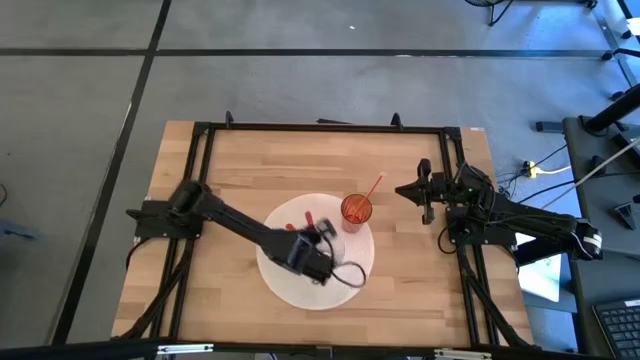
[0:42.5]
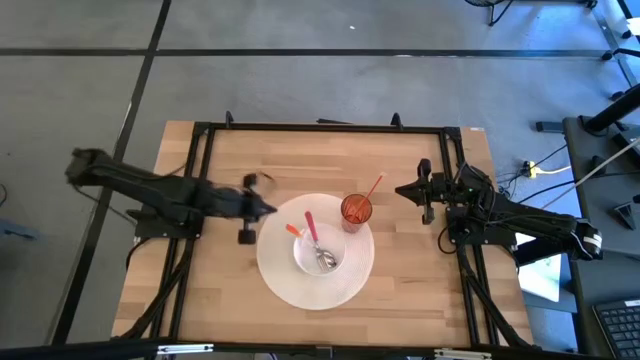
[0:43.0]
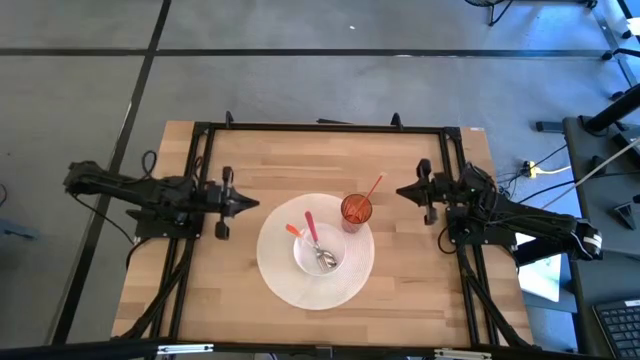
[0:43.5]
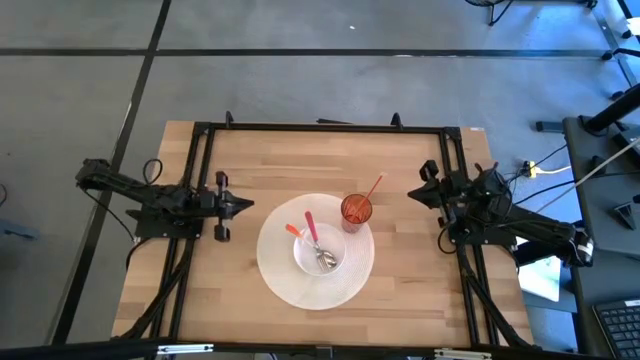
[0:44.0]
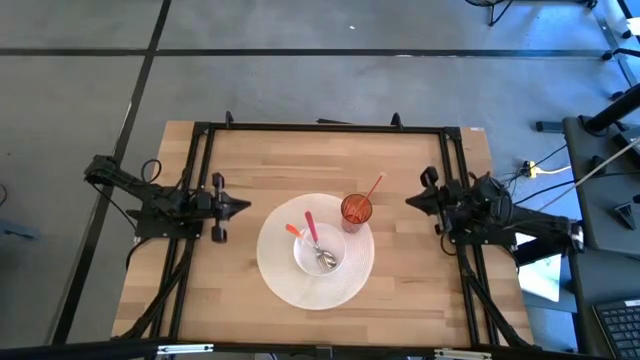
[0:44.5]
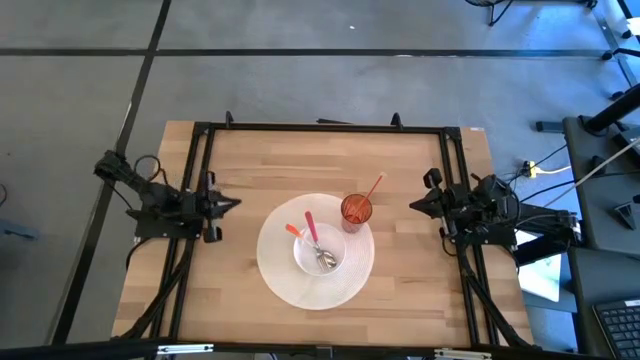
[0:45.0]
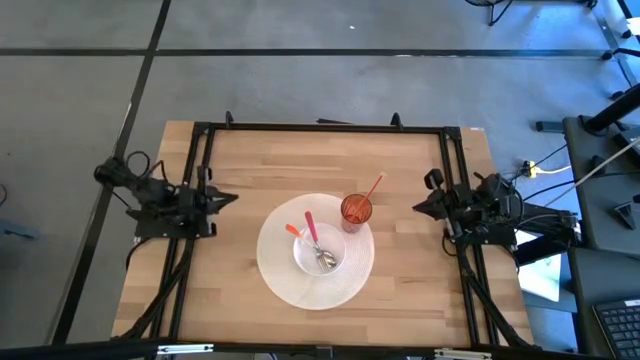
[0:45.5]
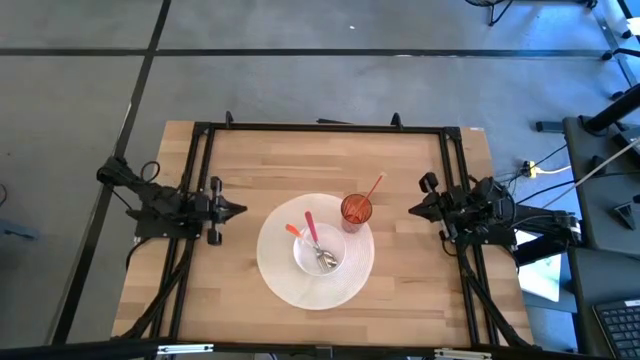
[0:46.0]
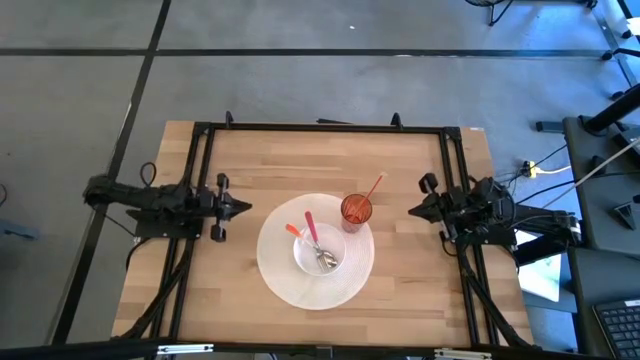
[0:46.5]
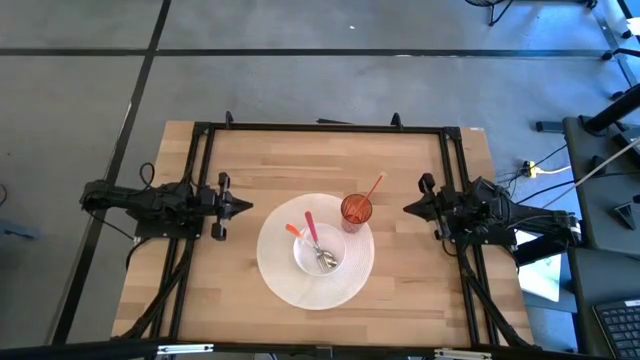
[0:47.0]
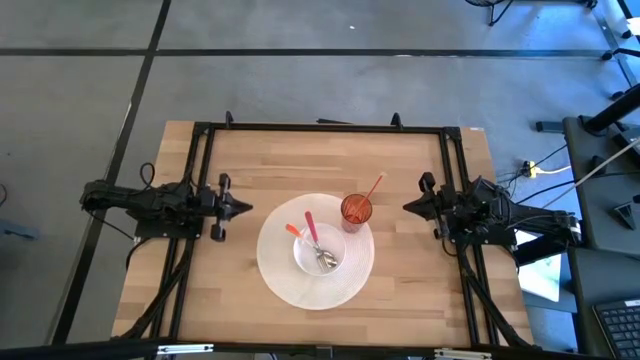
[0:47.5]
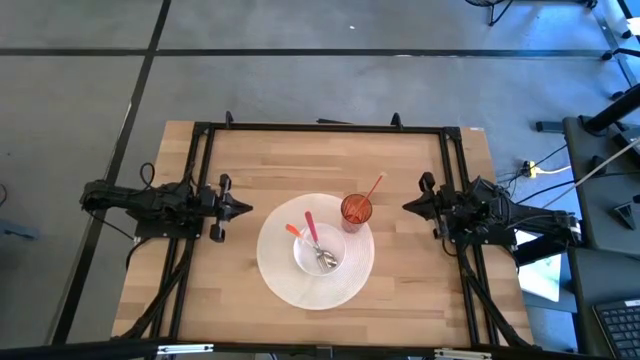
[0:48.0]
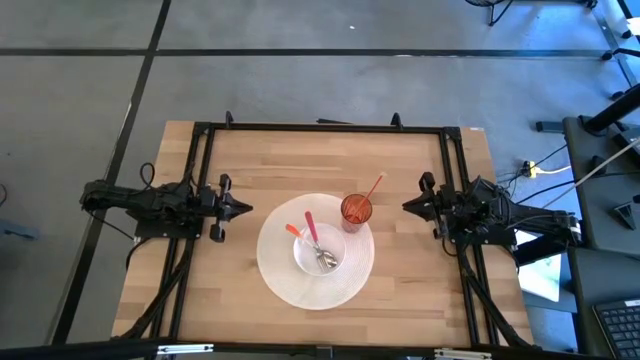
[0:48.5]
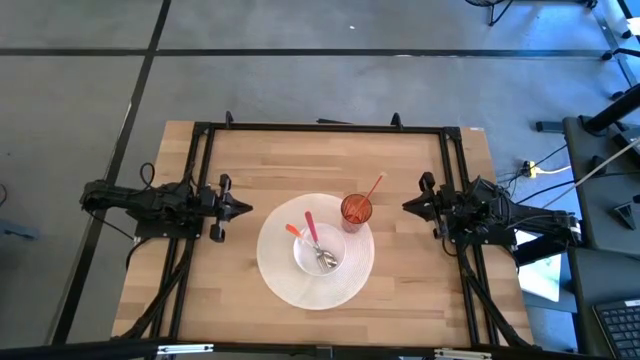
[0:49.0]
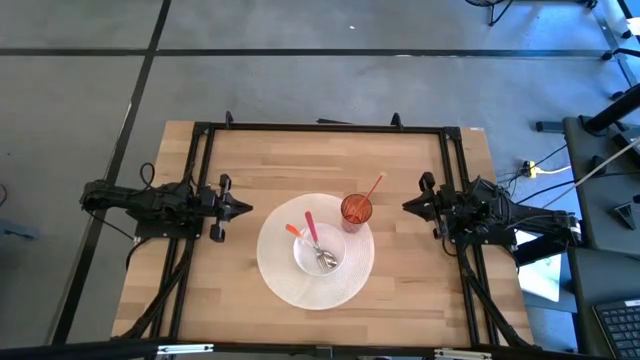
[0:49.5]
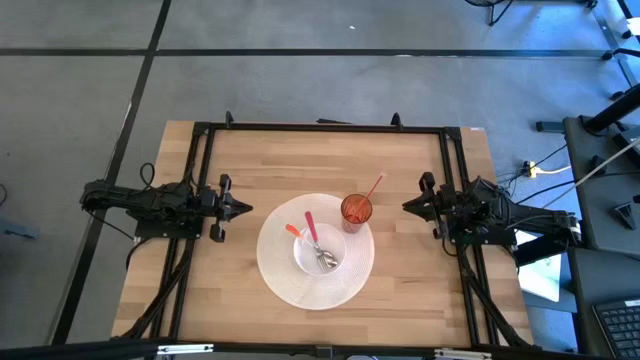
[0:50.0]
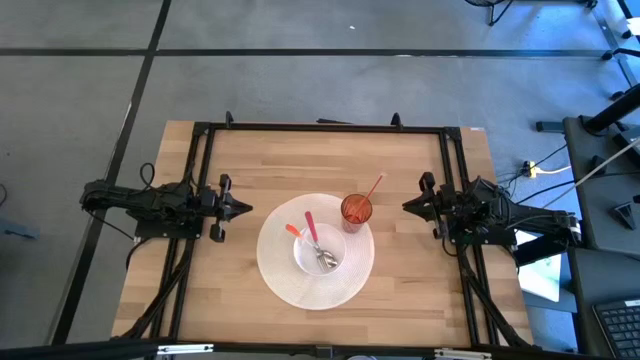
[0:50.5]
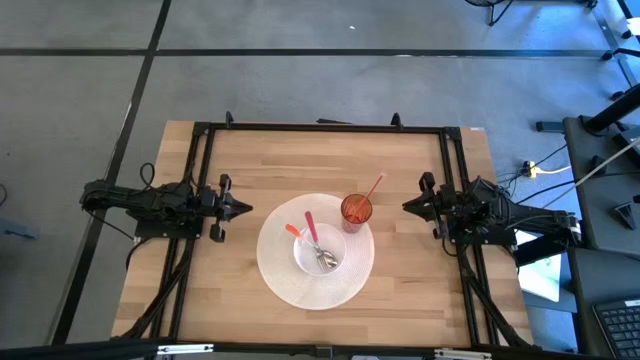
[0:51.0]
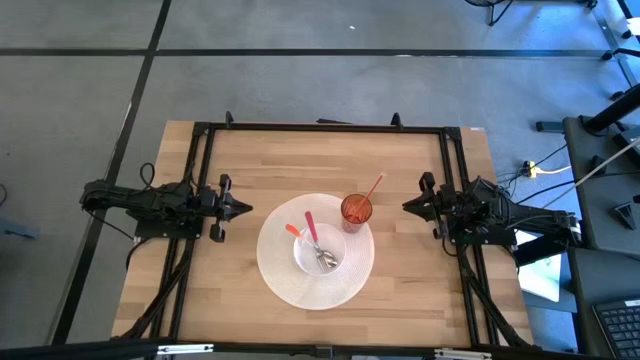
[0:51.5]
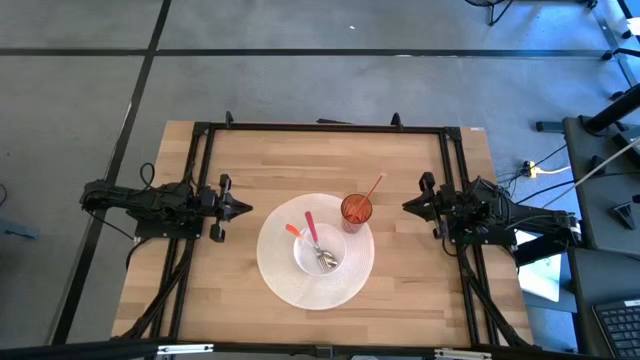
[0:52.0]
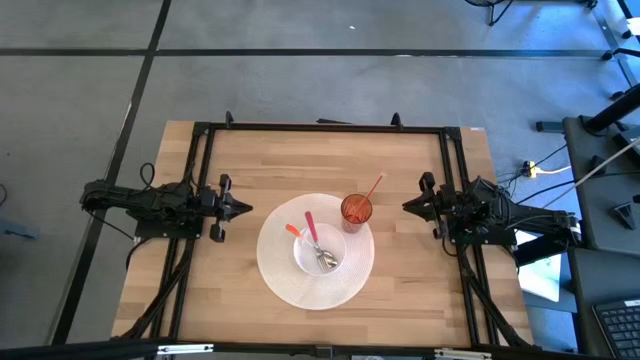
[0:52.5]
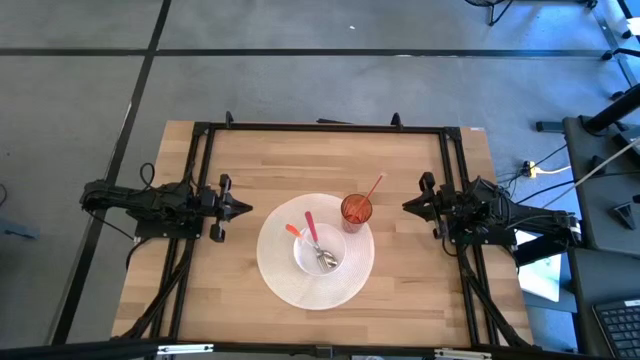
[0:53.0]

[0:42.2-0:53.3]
Task: Pick & Place Utensil
Return to Home Position

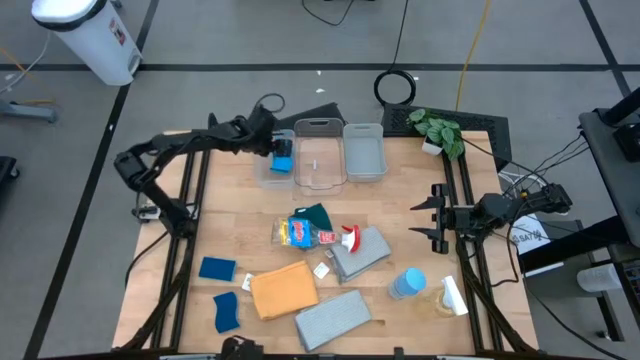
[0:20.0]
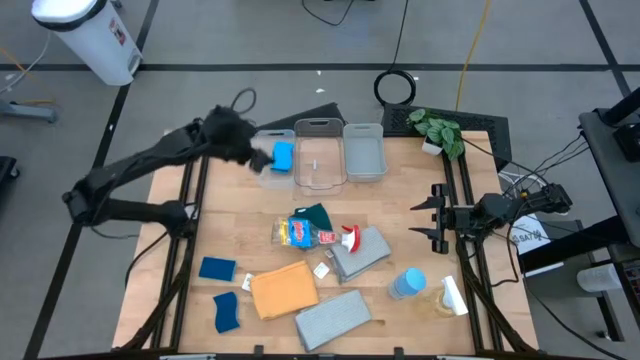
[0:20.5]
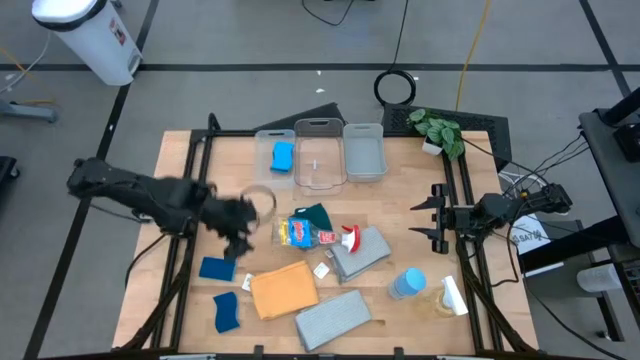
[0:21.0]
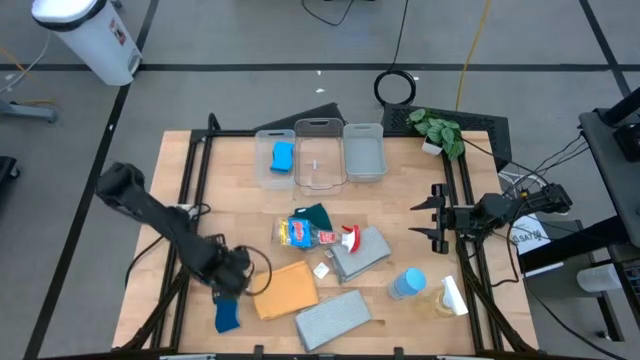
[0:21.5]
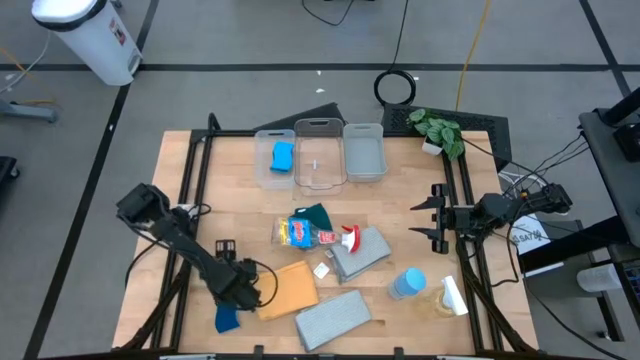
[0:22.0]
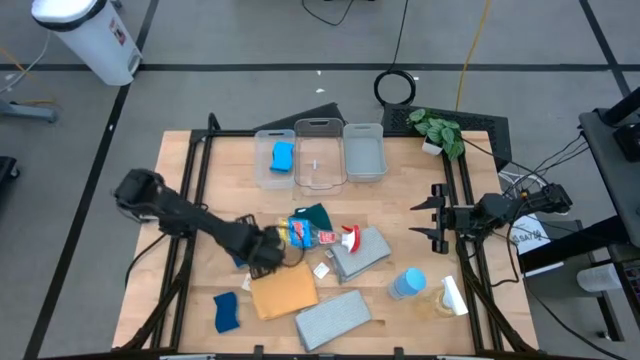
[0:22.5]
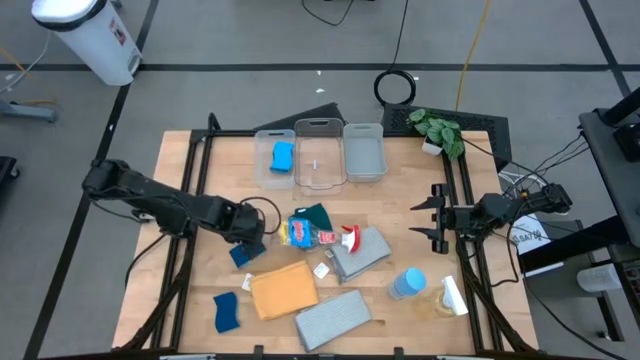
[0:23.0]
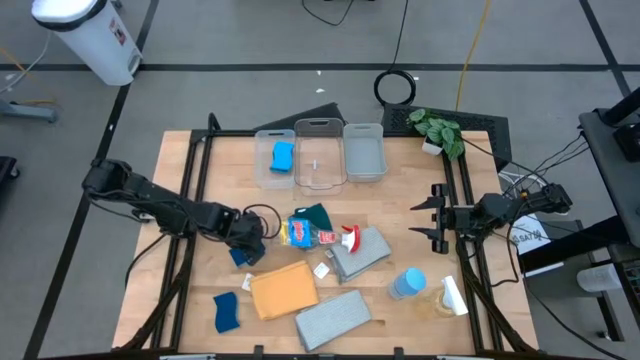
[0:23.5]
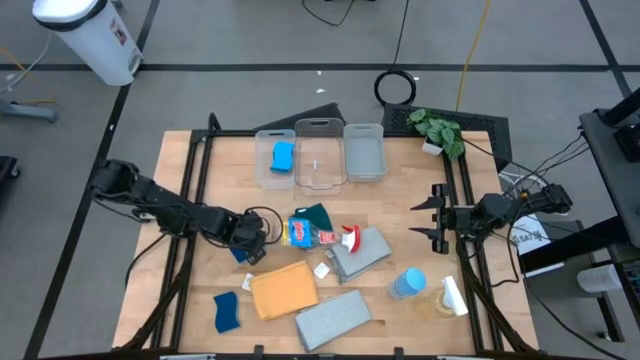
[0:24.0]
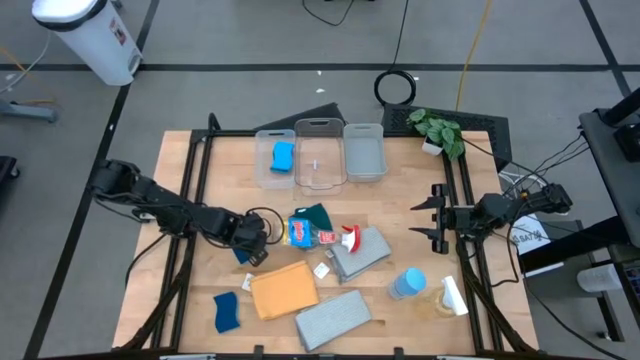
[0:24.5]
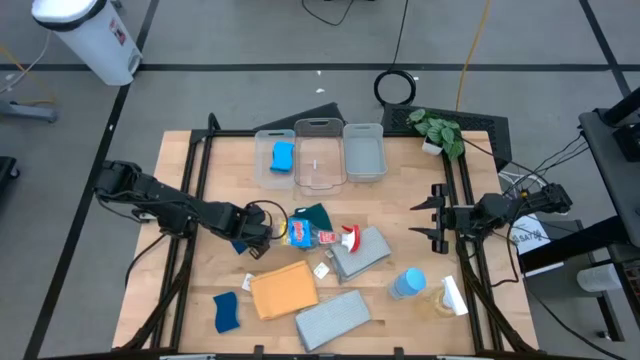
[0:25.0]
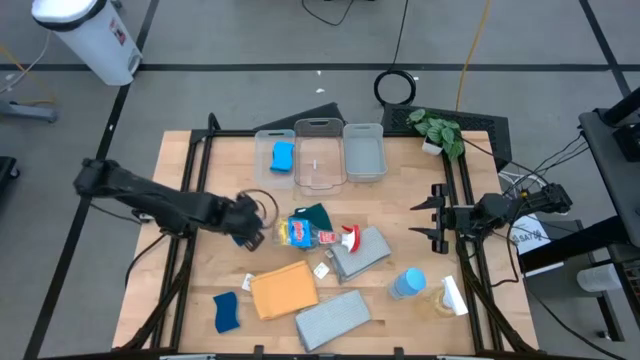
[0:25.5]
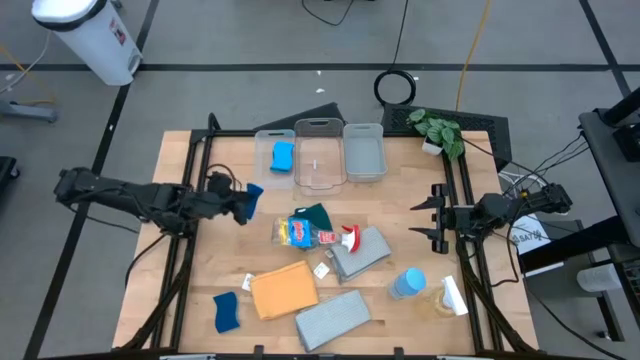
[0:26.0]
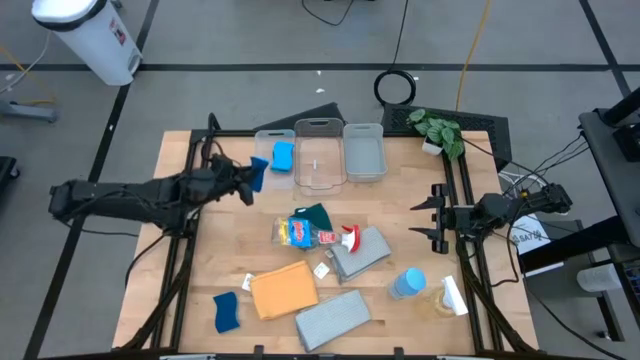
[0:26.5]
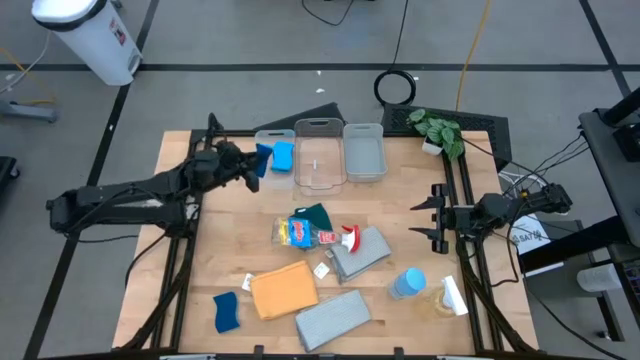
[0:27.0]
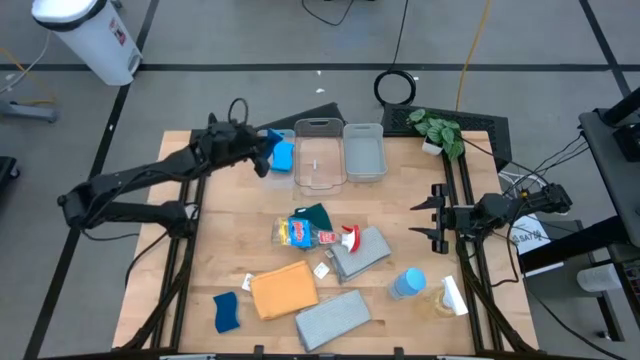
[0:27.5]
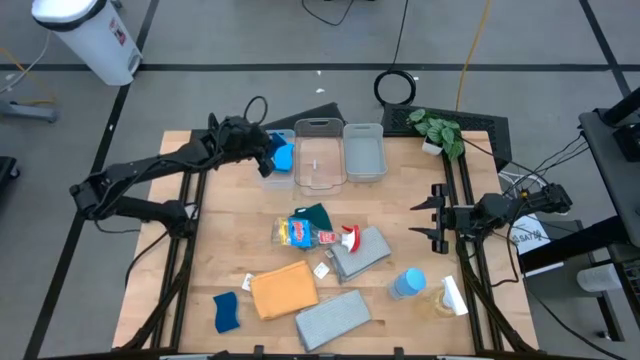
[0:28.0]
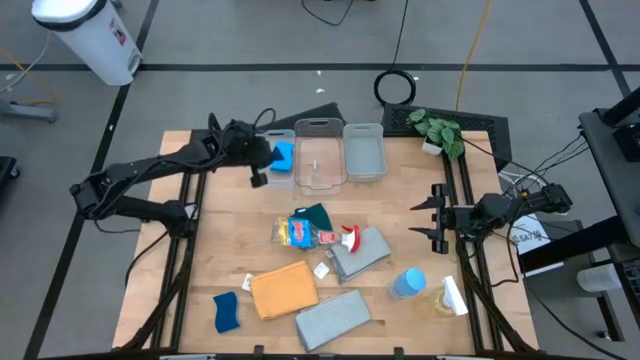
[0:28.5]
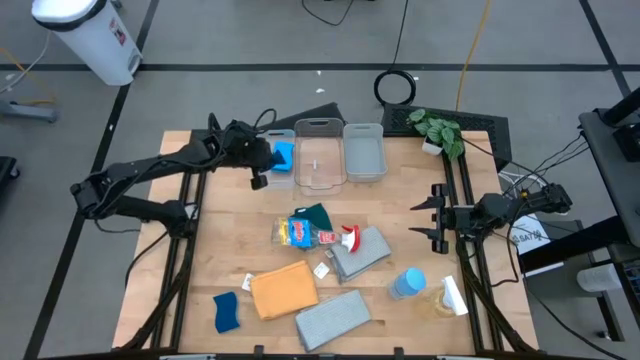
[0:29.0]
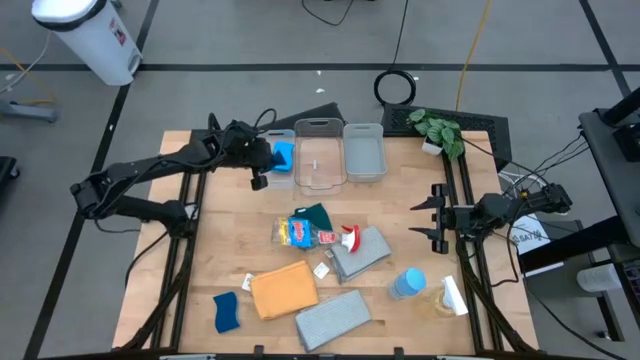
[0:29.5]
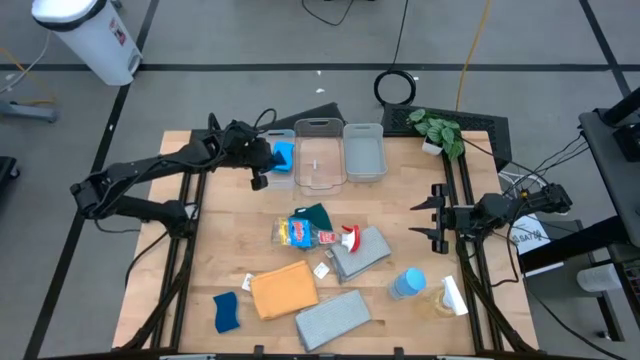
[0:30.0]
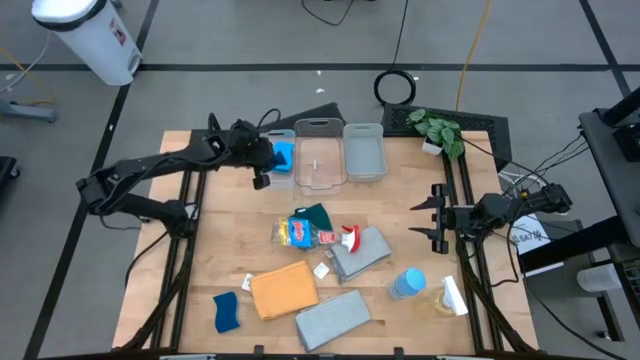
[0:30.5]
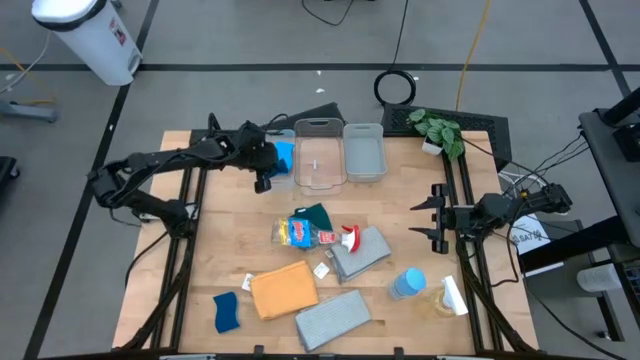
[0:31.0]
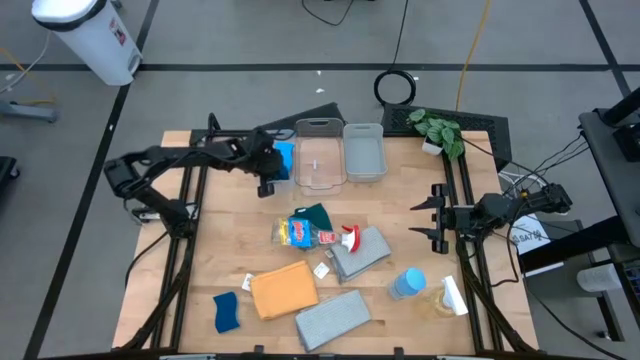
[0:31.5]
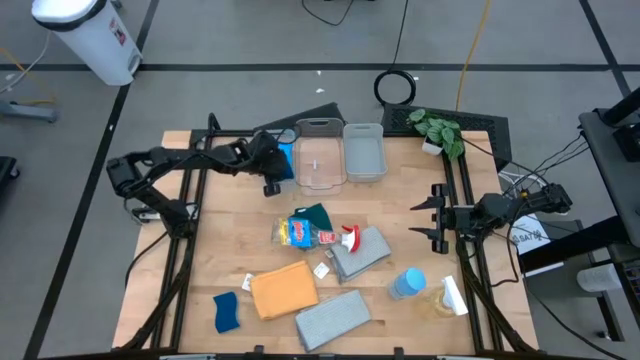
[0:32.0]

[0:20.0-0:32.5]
Task: Pick & Place Kitchen Items
Put the blue sponge into the white transparent bin
